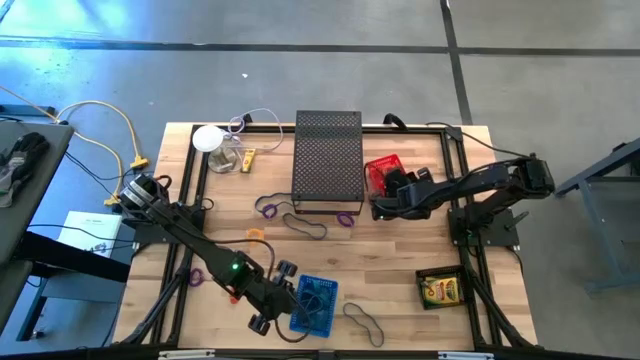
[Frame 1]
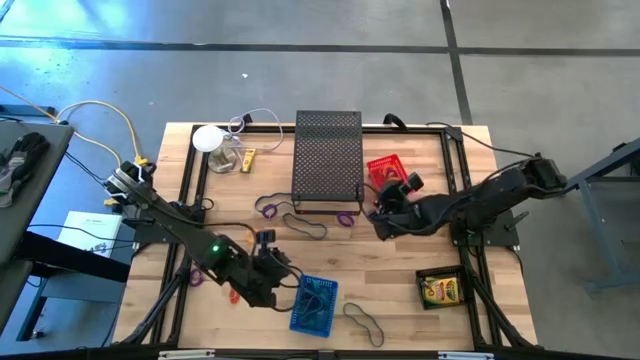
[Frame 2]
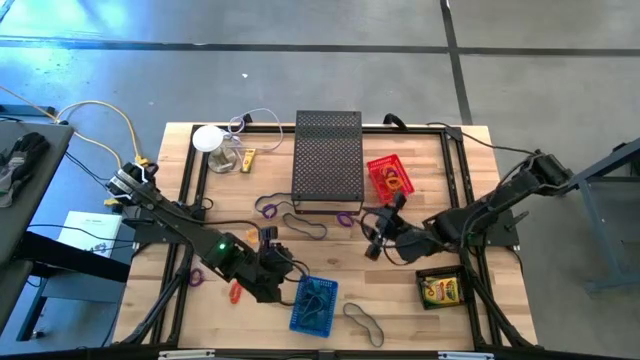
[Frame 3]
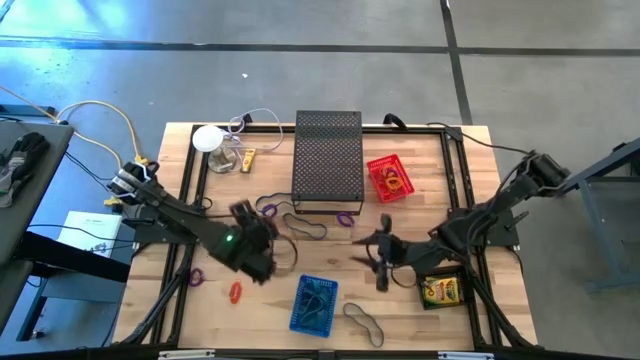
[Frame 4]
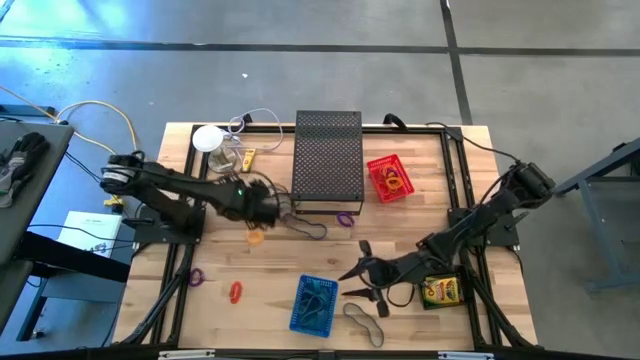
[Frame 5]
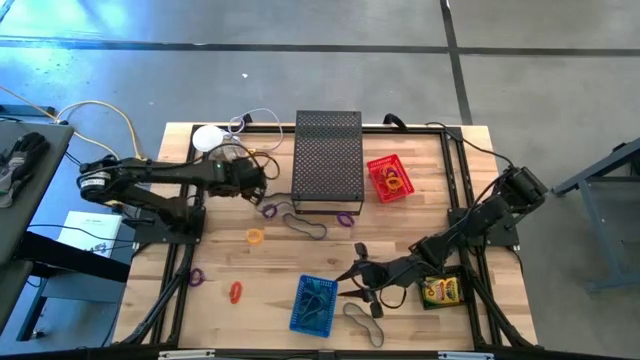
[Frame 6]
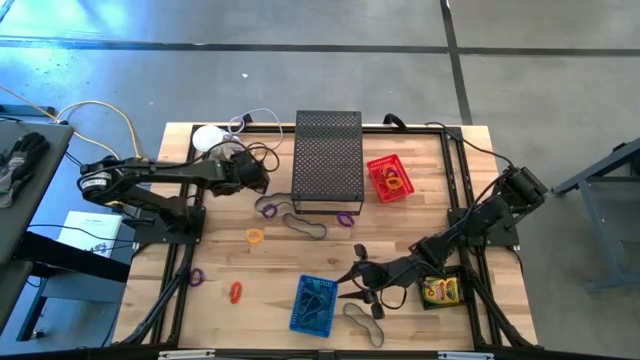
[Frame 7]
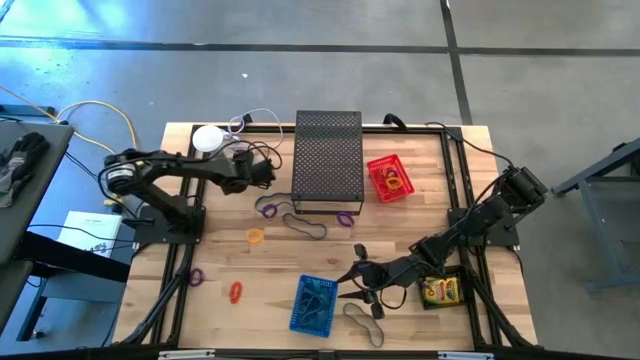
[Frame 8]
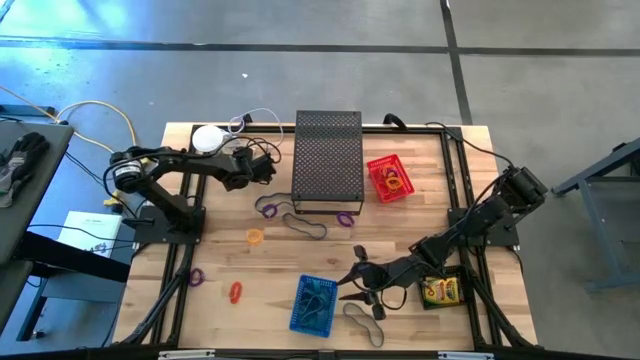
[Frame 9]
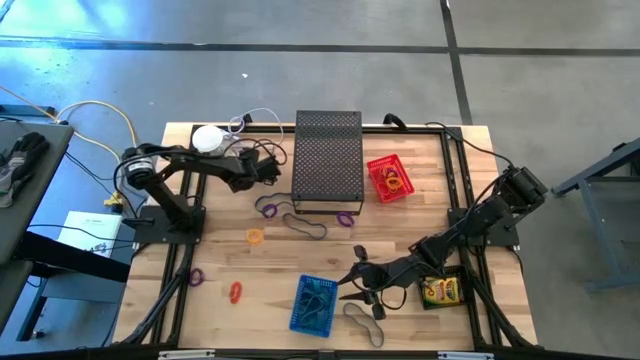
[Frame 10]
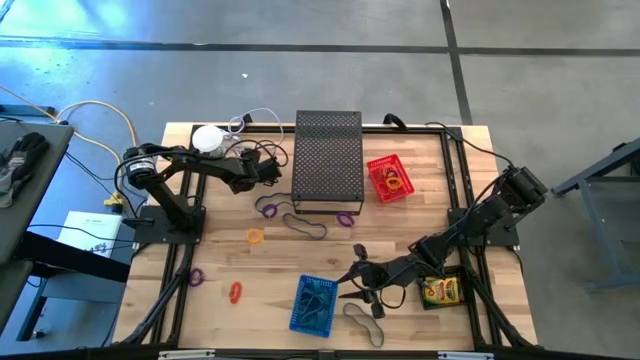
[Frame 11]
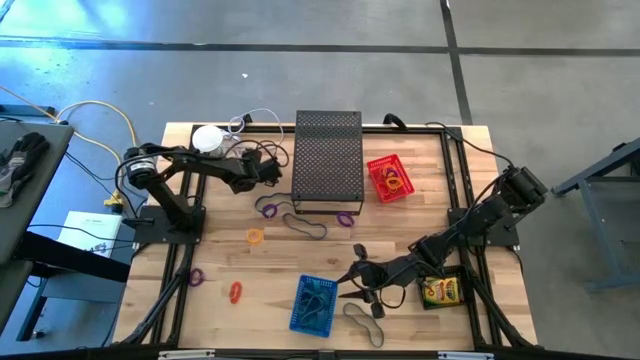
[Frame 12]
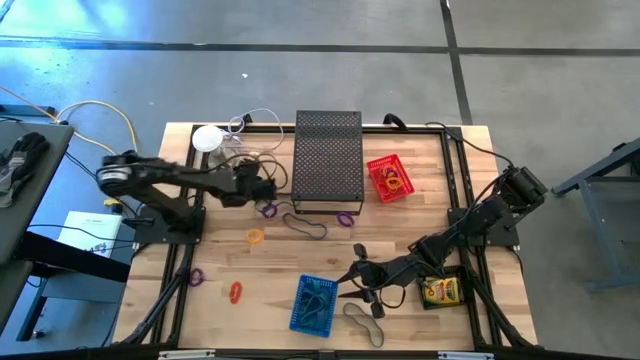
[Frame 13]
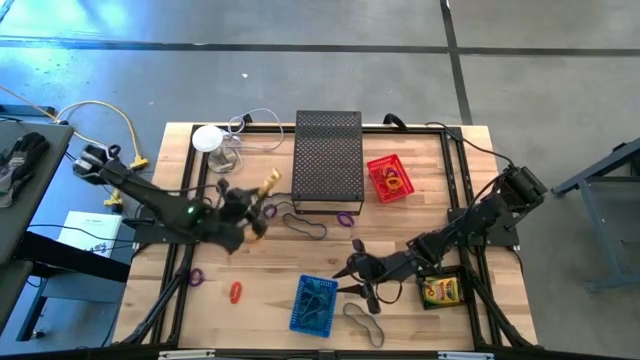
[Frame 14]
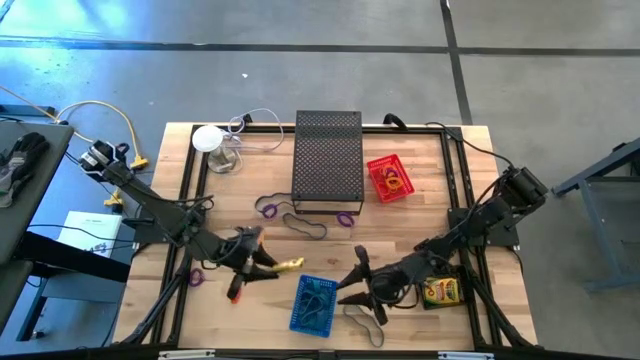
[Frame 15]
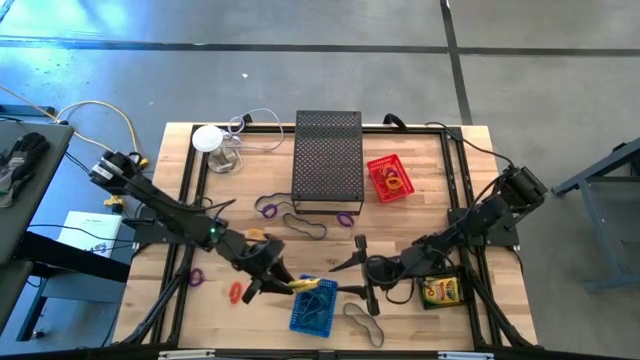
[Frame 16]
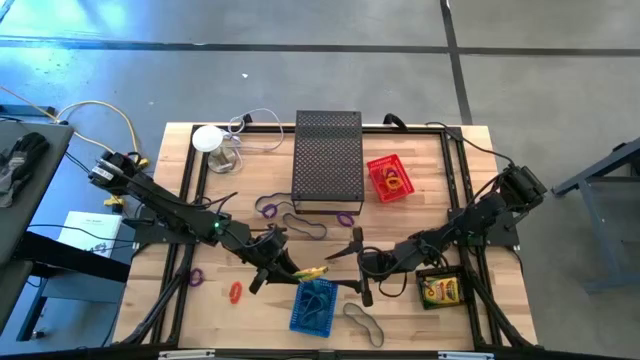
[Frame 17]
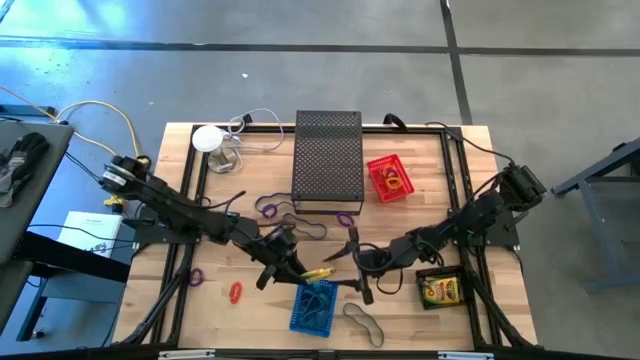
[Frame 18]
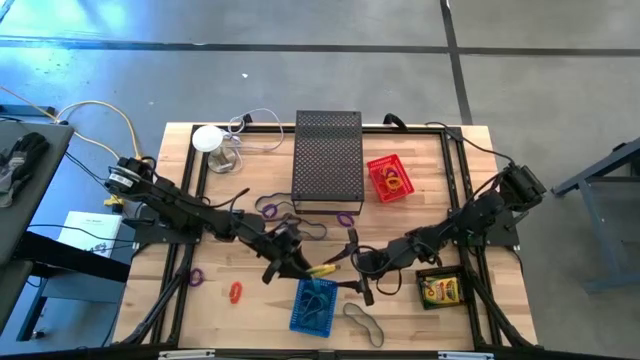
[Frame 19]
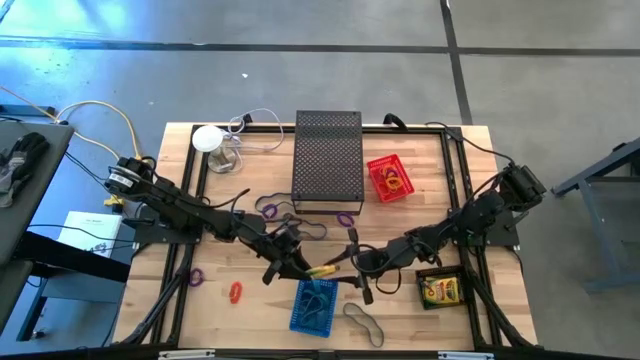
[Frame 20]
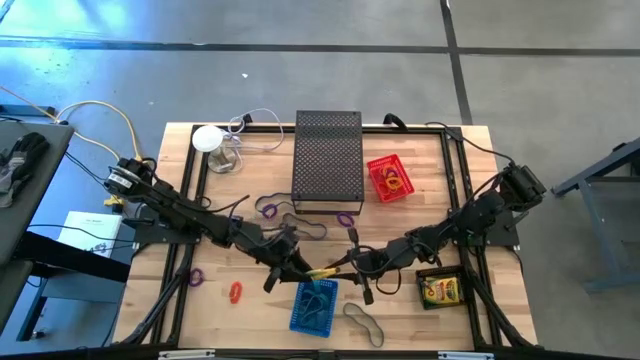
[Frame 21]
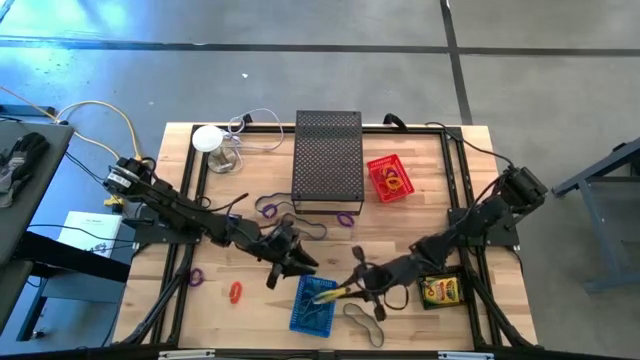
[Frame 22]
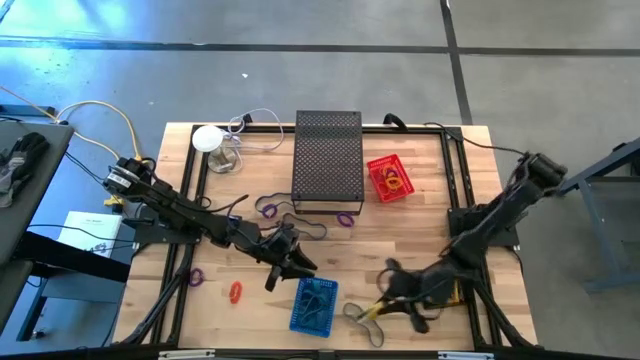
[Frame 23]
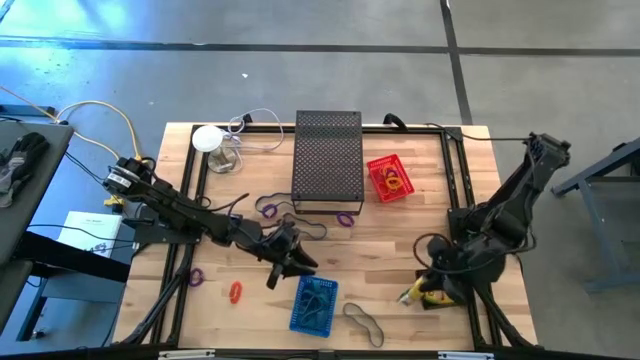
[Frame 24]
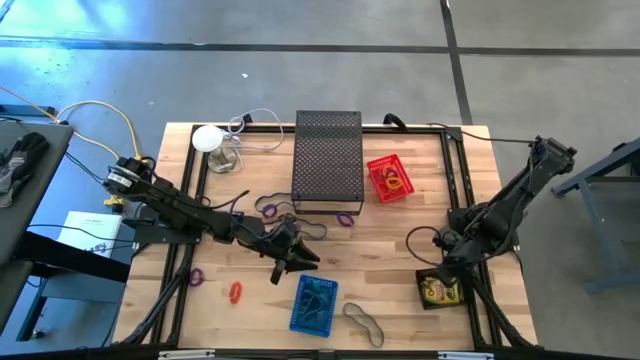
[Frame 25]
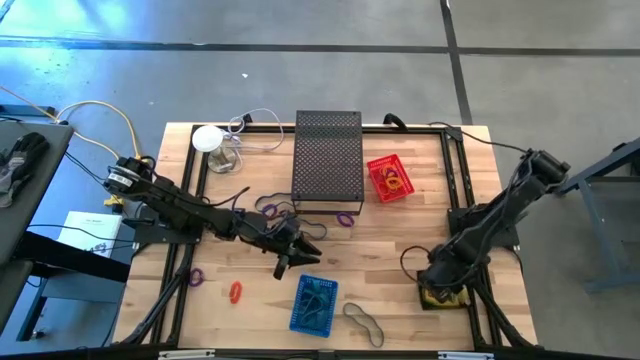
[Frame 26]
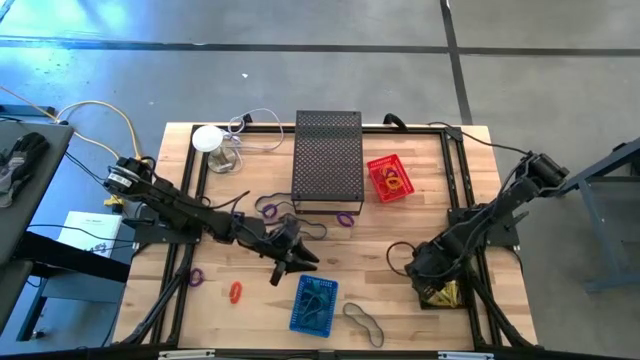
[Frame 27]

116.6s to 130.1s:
Task: Pick & Place Office Desk Supplies
Put the crayon box into the black bin

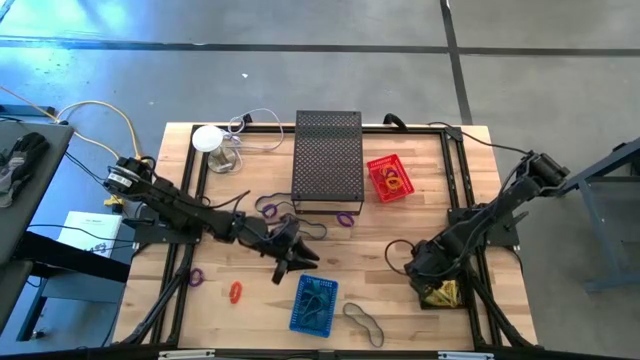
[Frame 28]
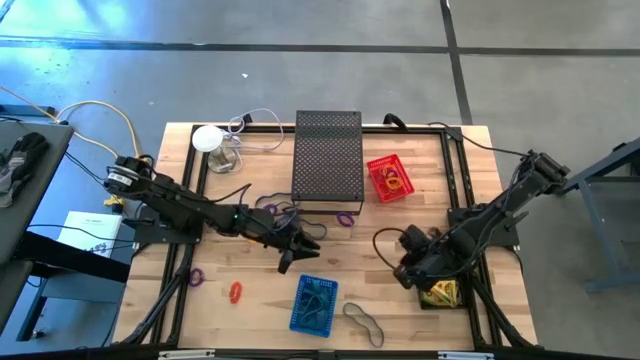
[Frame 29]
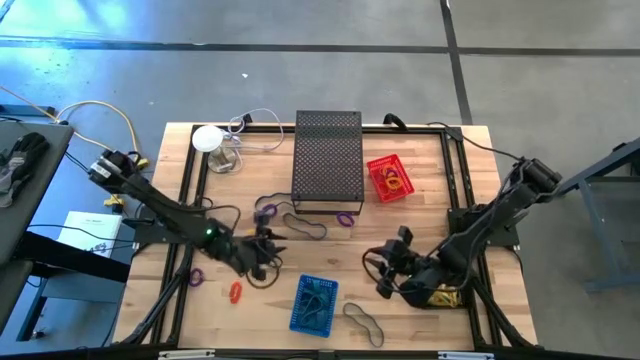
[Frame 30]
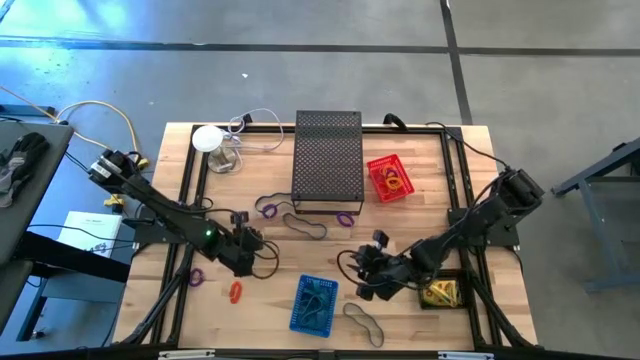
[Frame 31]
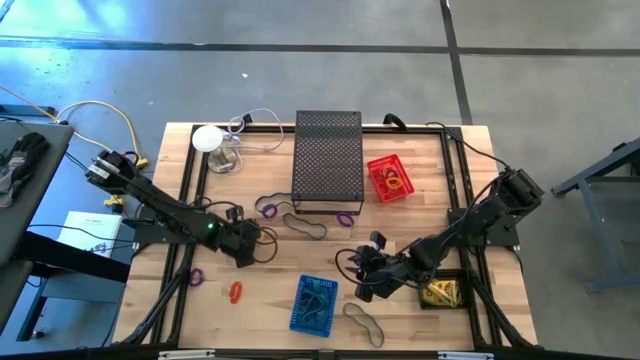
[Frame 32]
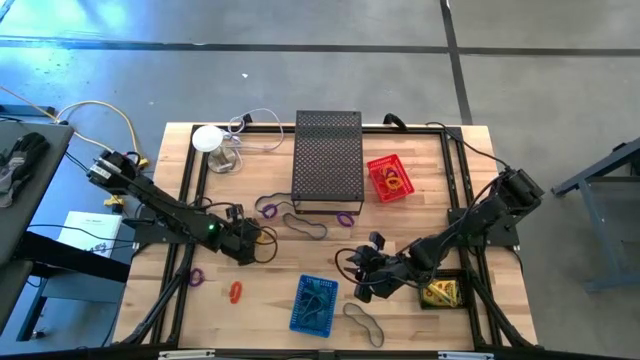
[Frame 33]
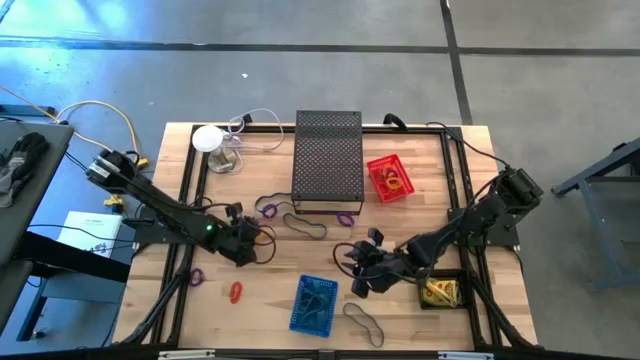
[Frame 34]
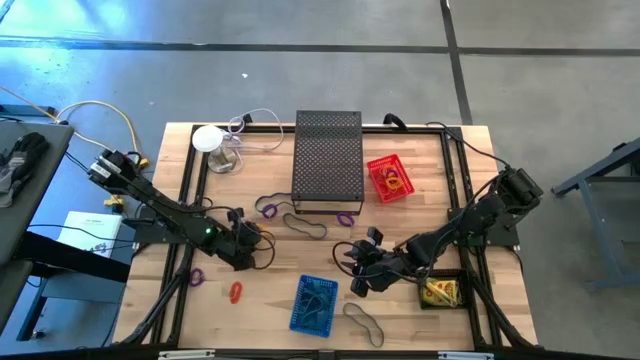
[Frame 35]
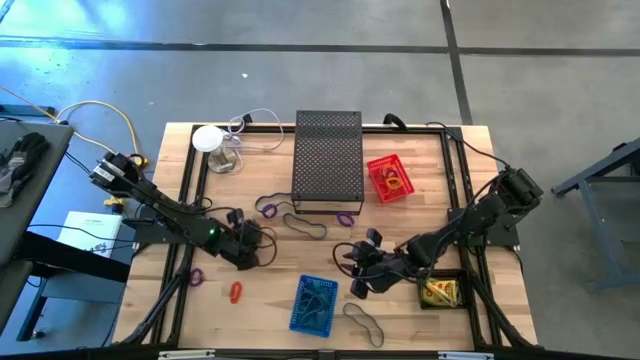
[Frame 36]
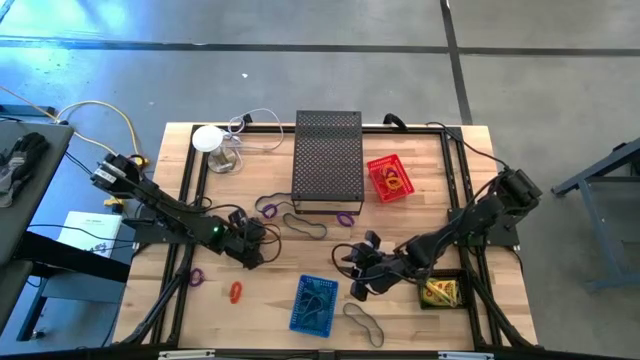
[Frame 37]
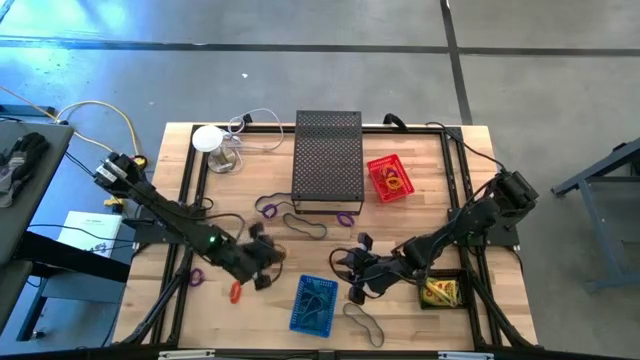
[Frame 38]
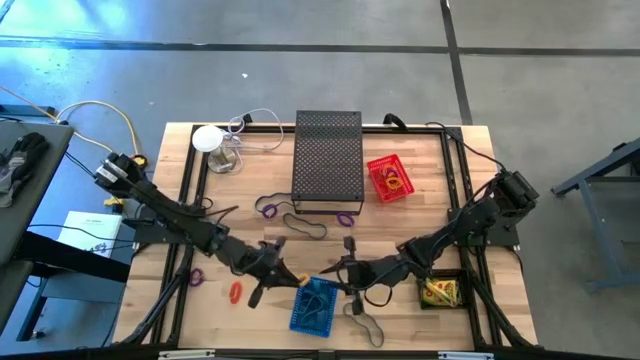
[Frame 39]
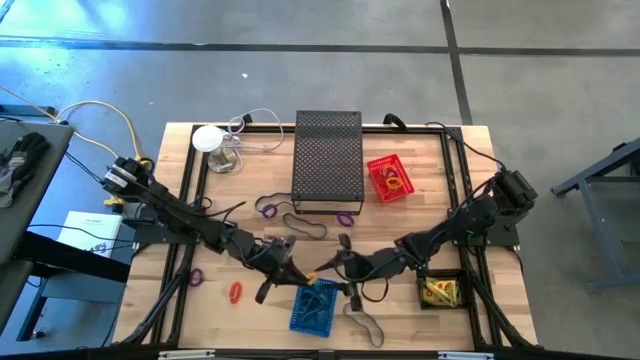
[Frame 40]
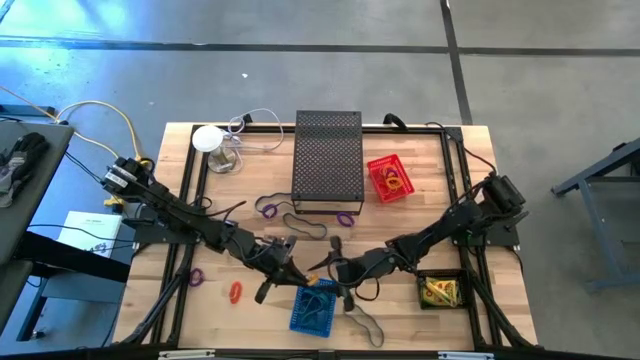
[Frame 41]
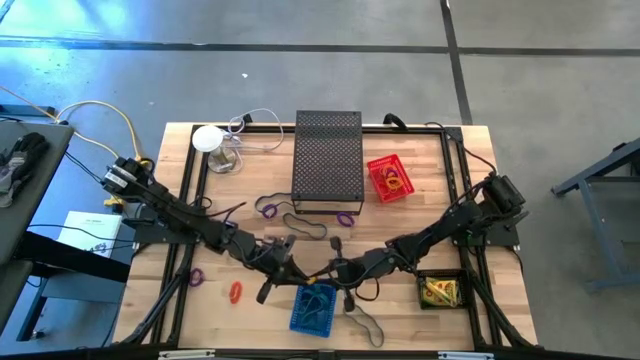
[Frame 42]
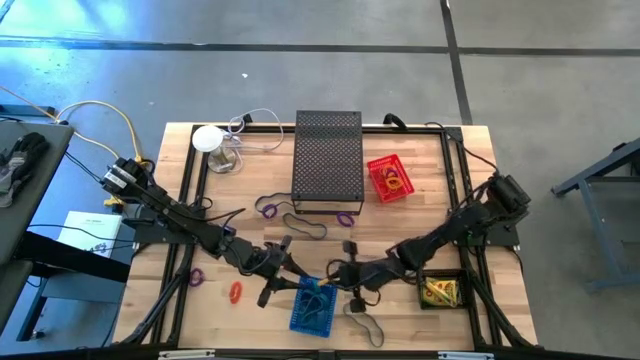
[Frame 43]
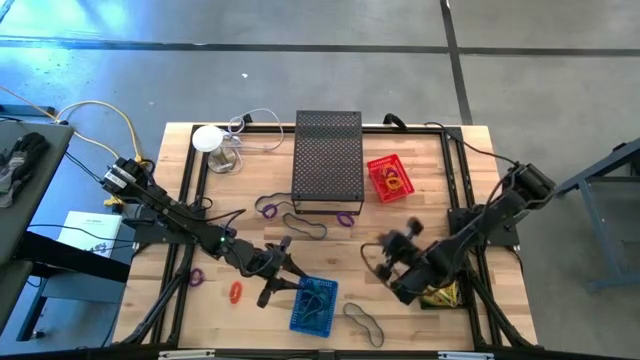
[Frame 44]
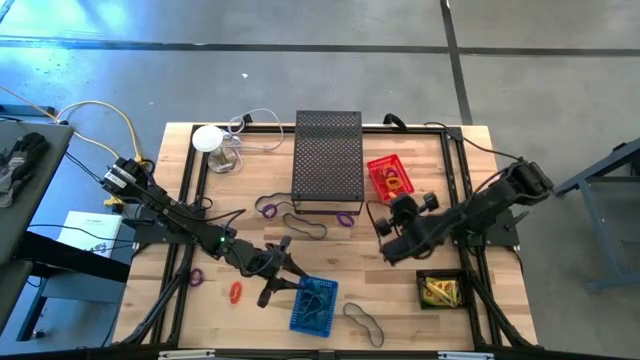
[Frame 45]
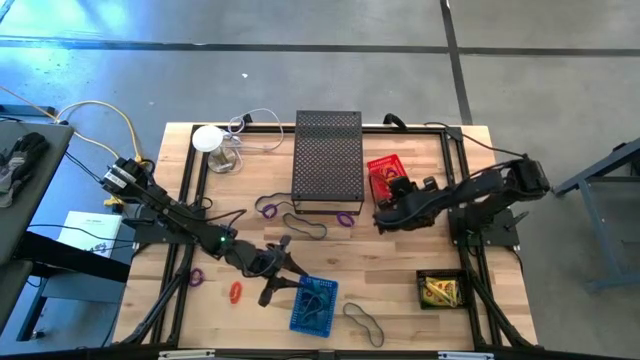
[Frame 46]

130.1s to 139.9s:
Put the yellow spring keychain into the red bin
